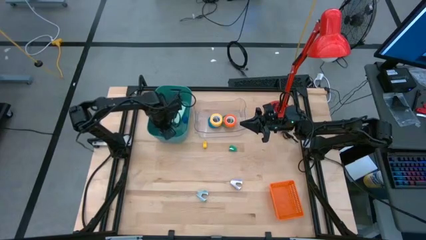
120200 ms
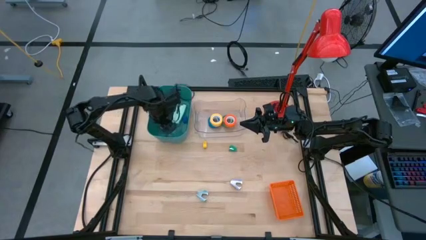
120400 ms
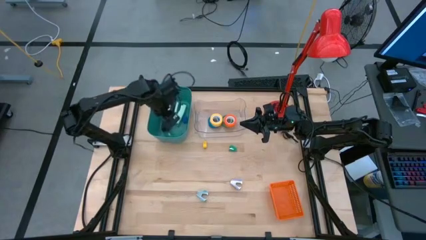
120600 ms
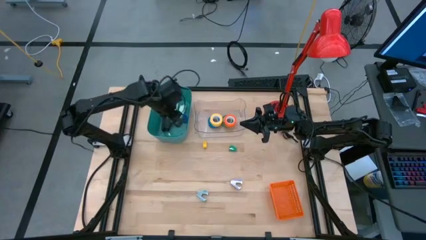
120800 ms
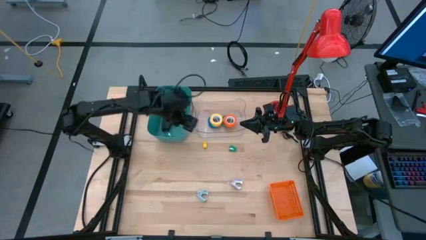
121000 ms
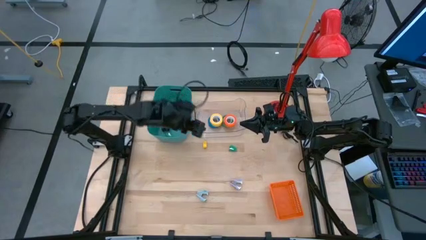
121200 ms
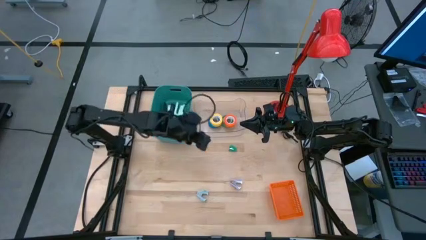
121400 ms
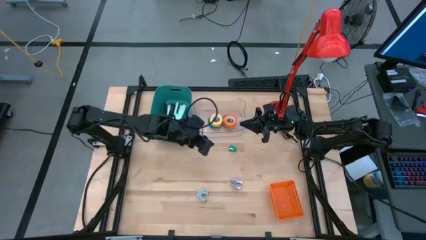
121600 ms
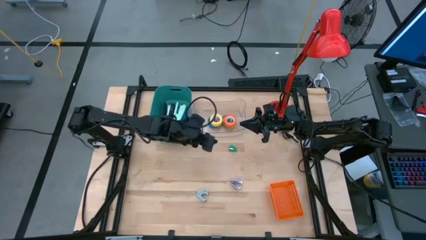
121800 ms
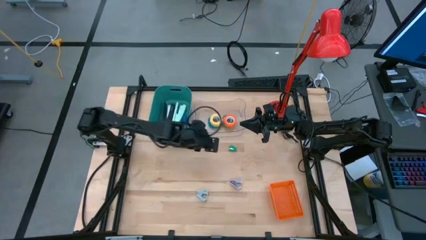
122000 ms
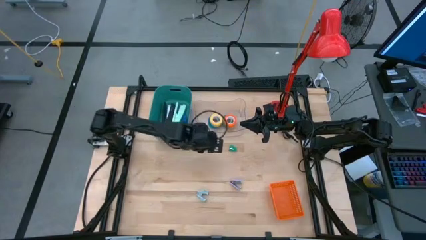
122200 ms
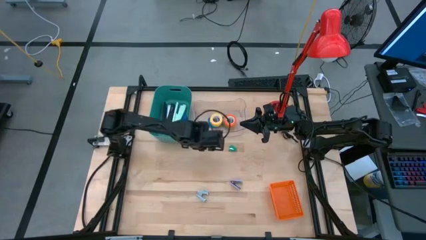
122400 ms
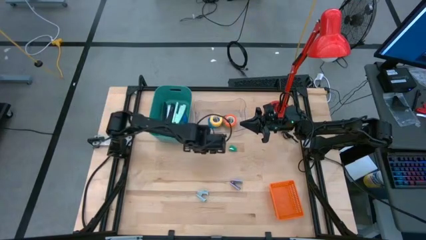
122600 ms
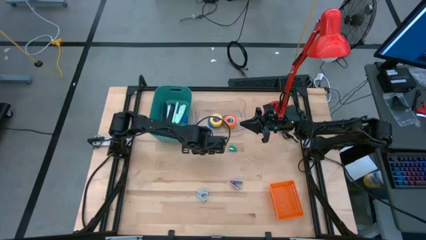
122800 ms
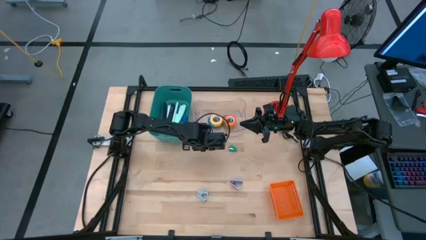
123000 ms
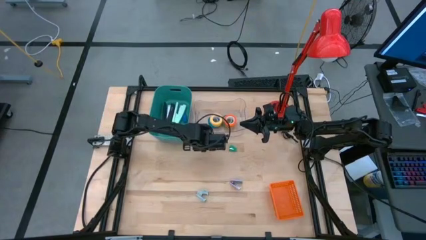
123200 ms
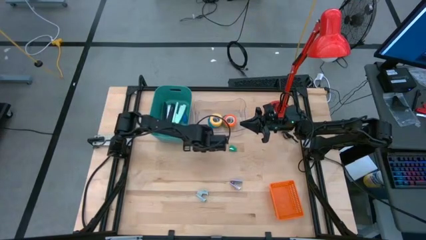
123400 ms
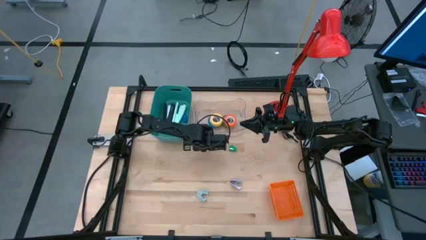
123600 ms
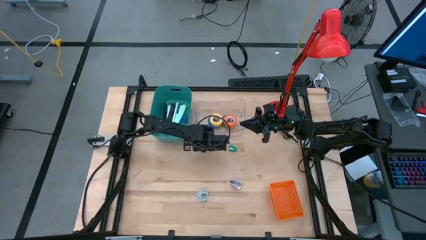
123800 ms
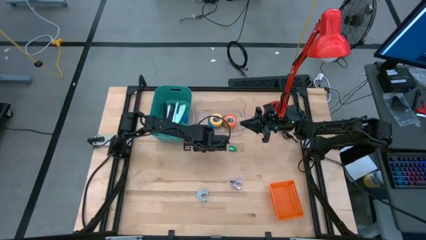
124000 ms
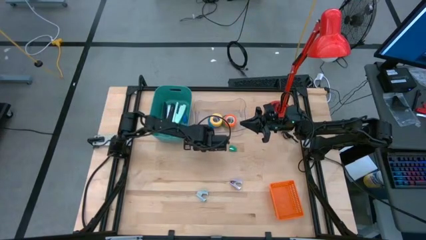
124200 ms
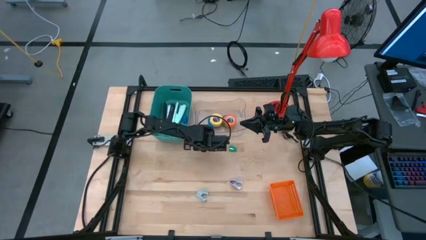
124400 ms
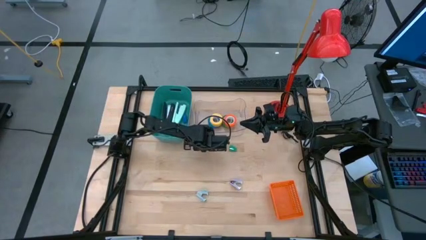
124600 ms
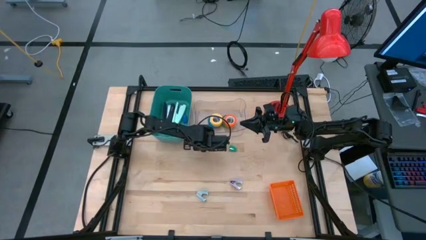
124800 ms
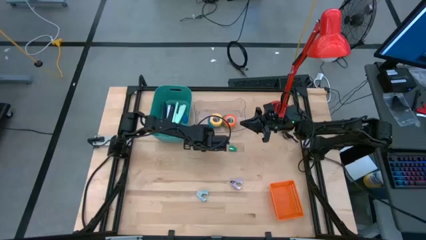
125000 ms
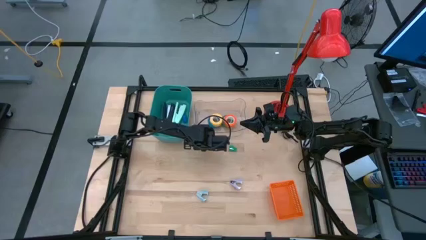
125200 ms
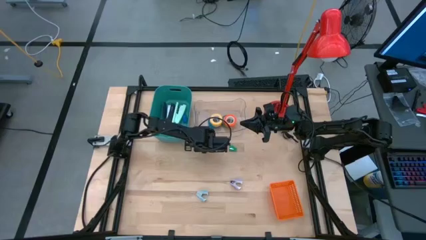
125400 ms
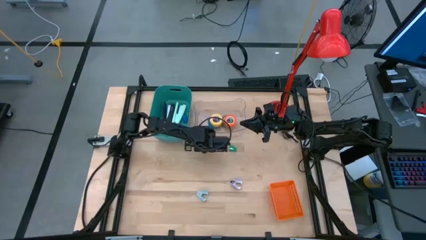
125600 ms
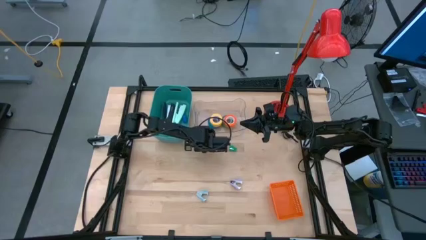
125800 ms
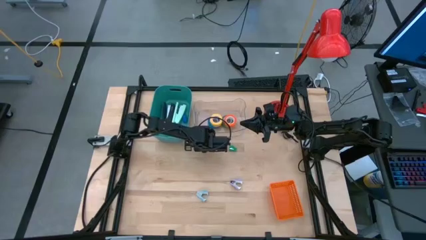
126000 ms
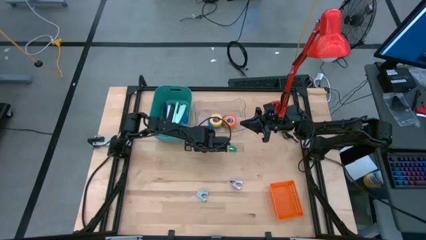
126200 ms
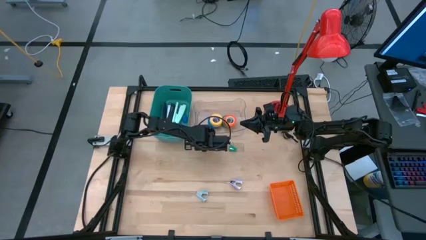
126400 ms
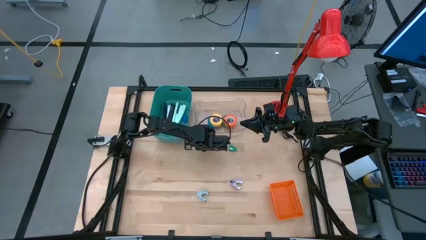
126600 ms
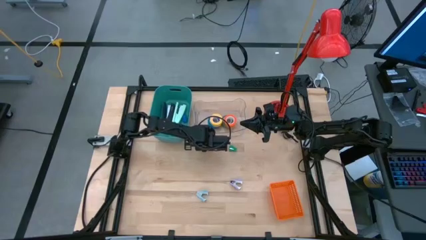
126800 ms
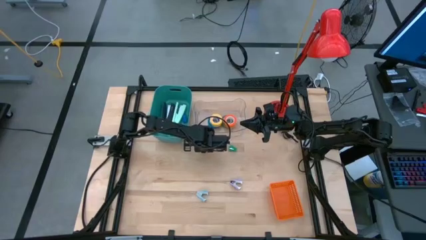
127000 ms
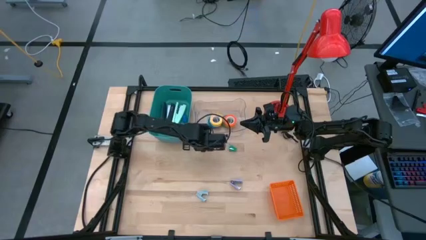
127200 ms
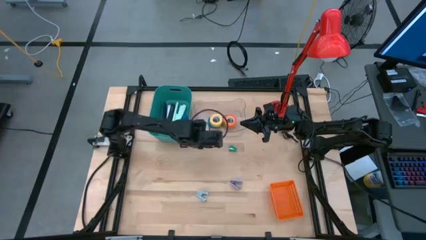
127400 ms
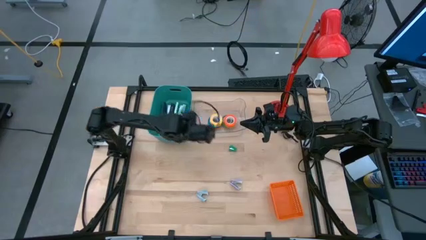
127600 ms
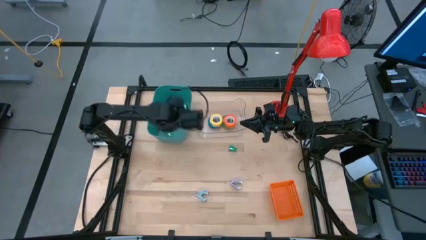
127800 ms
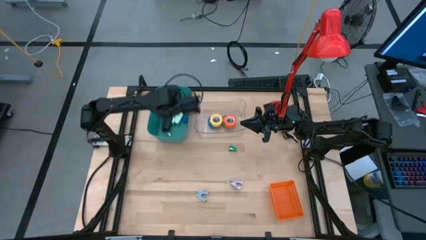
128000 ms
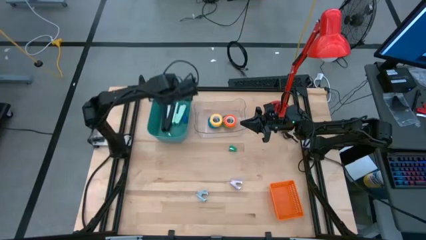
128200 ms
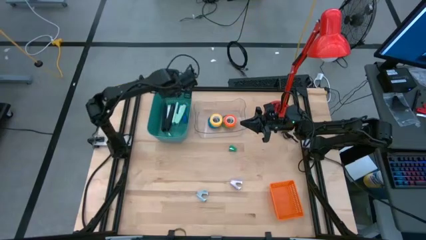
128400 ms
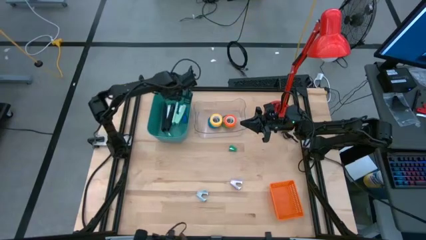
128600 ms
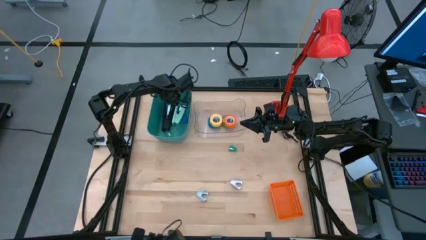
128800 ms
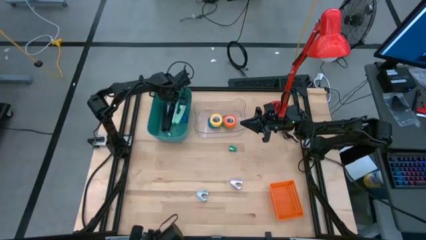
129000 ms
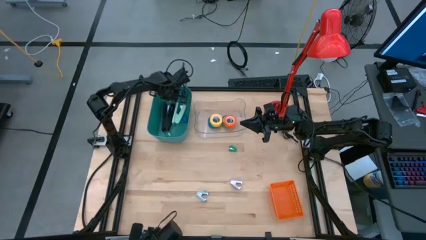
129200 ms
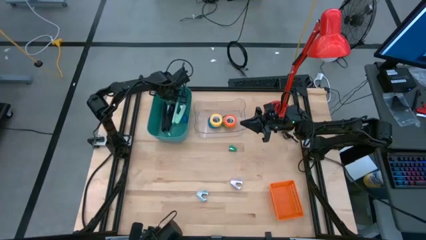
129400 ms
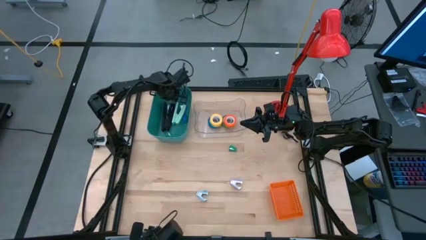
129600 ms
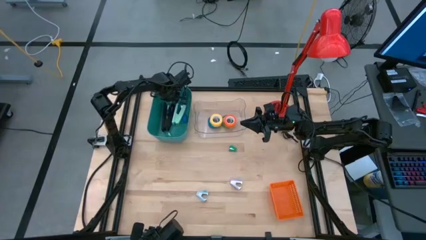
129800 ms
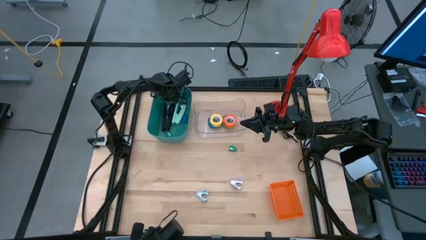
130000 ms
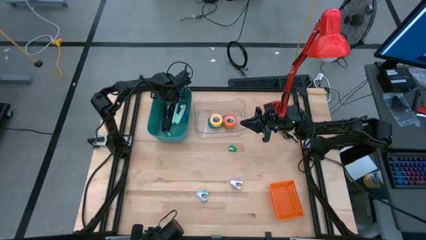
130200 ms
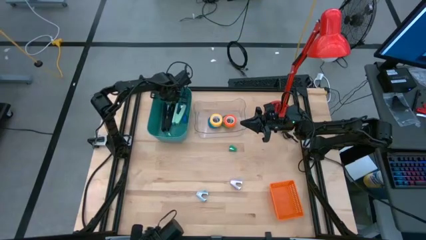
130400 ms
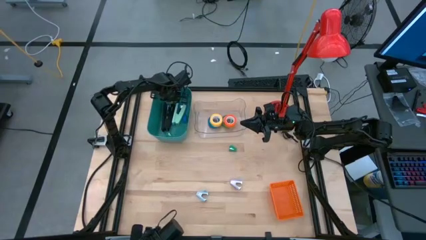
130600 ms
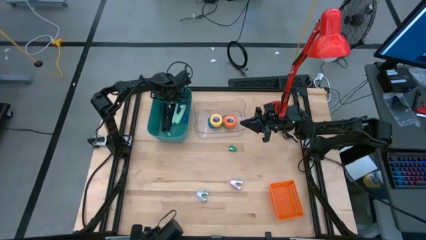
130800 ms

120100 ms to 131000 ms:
Task: Pick and place Stapler, Stapler remover, tape
Put the yellow stapler remover into the green bin
